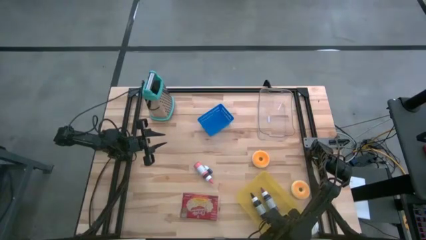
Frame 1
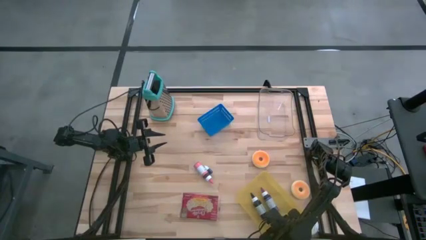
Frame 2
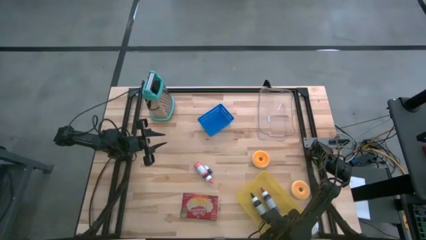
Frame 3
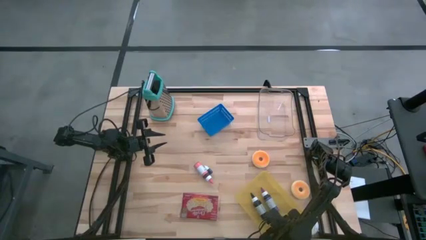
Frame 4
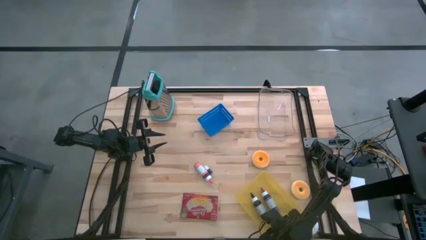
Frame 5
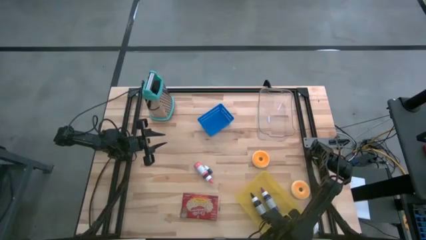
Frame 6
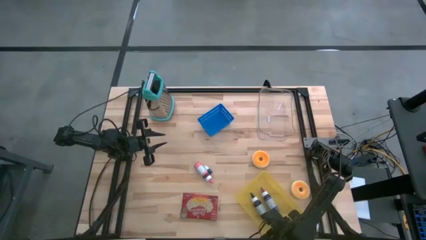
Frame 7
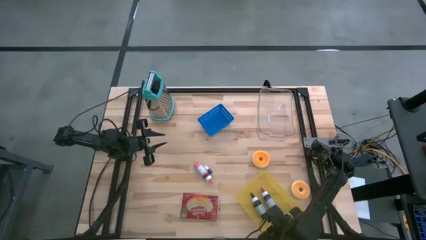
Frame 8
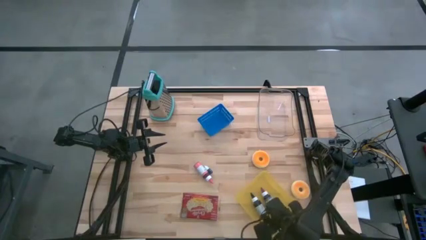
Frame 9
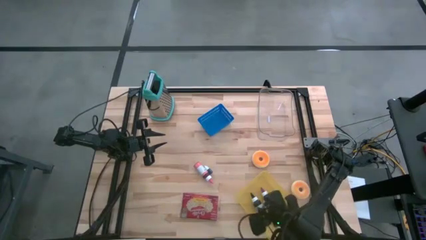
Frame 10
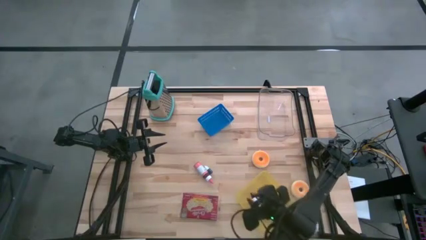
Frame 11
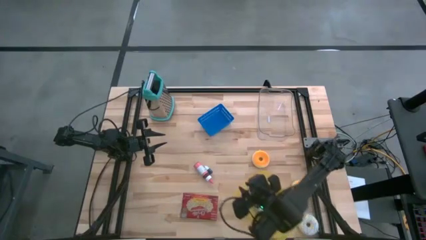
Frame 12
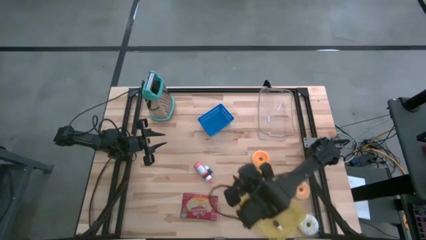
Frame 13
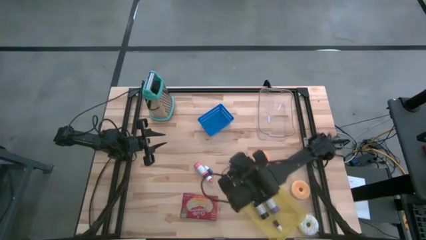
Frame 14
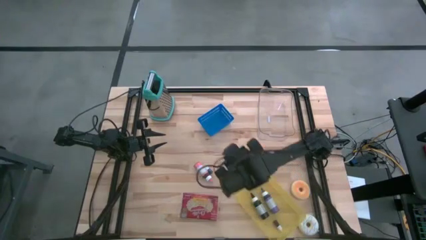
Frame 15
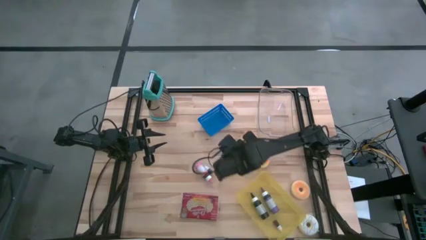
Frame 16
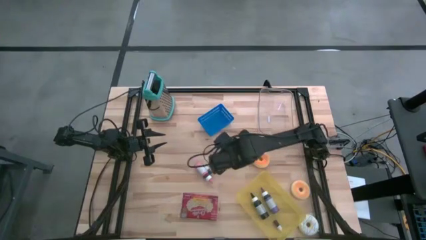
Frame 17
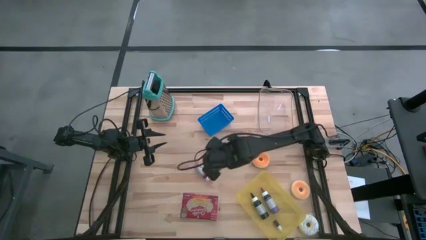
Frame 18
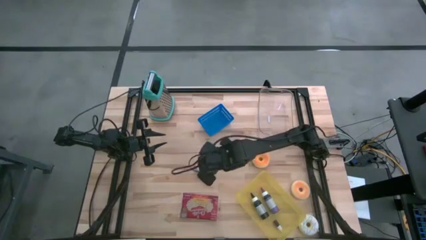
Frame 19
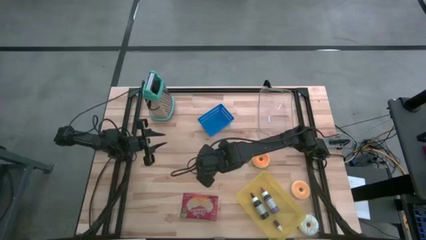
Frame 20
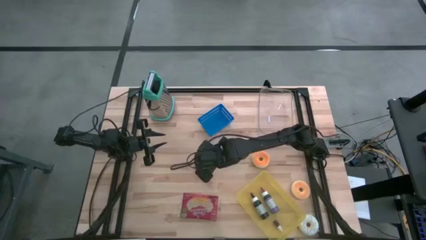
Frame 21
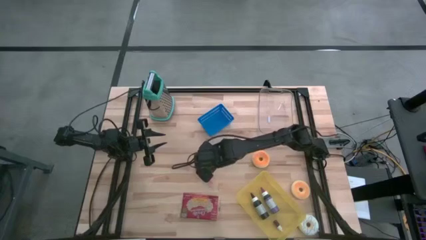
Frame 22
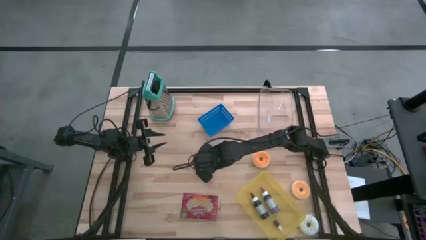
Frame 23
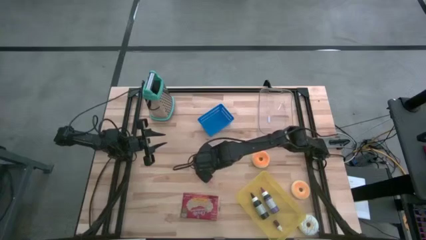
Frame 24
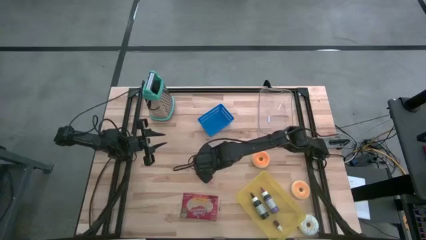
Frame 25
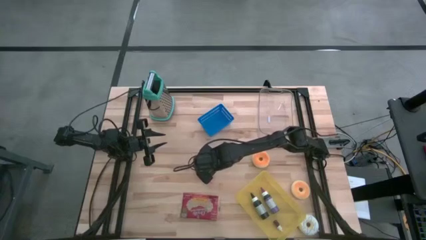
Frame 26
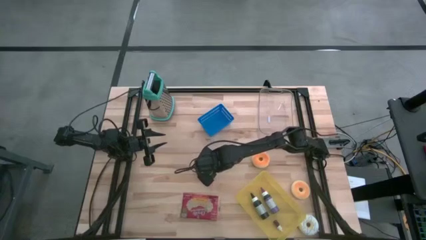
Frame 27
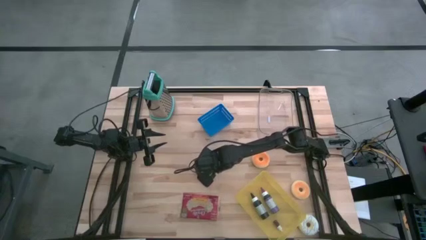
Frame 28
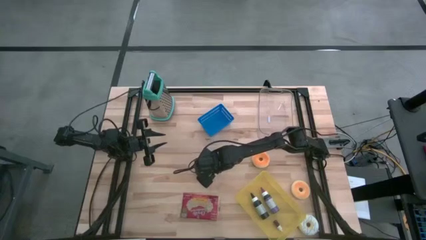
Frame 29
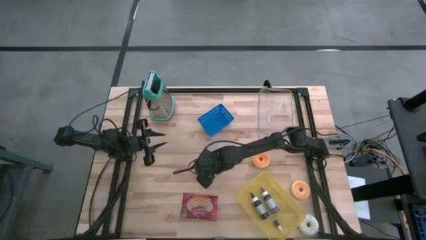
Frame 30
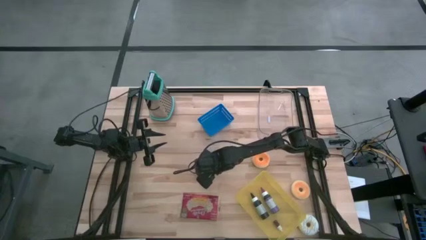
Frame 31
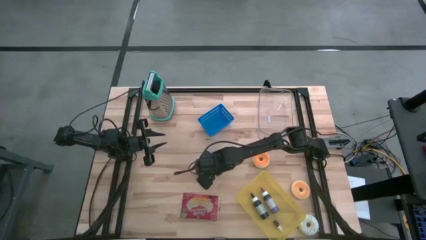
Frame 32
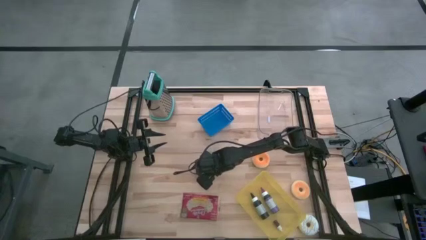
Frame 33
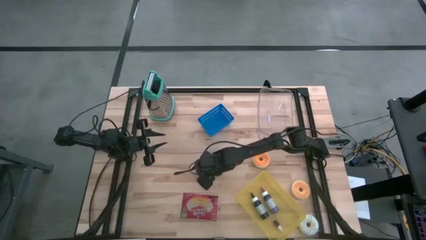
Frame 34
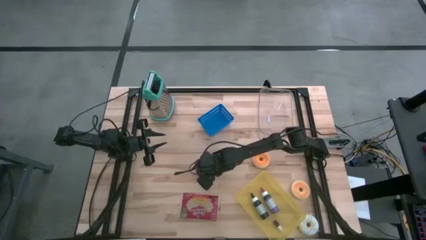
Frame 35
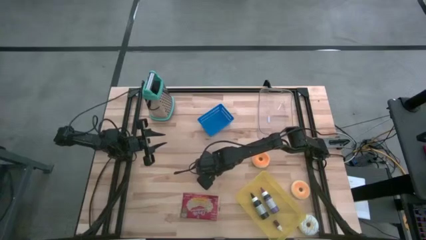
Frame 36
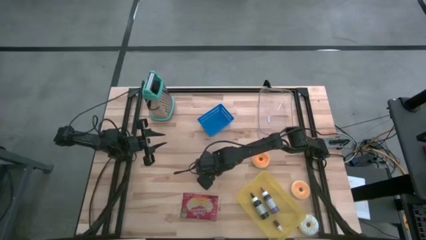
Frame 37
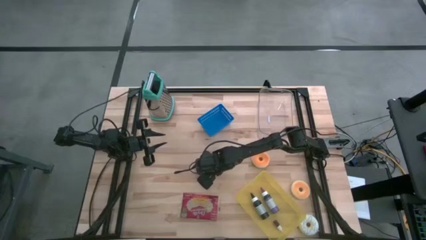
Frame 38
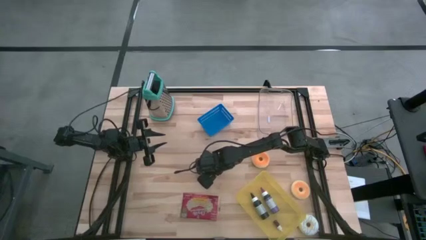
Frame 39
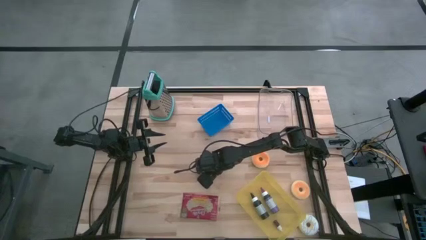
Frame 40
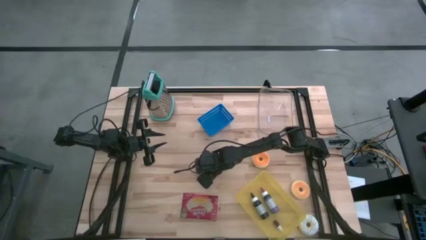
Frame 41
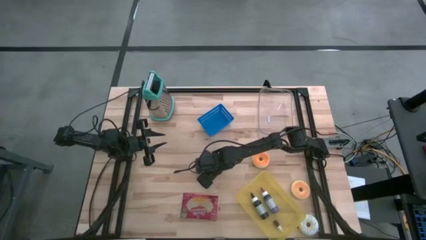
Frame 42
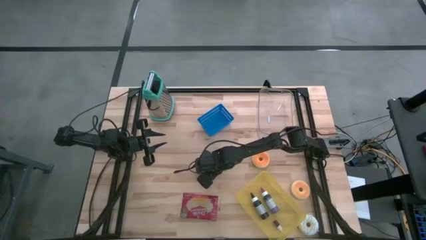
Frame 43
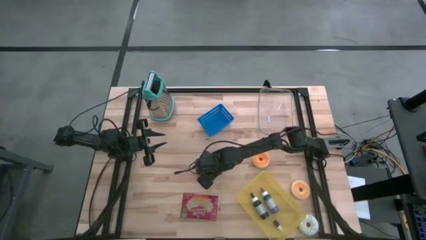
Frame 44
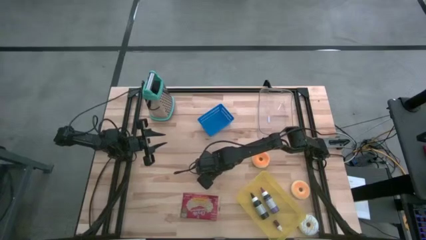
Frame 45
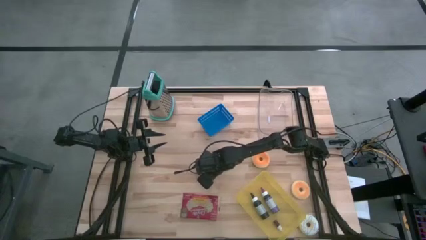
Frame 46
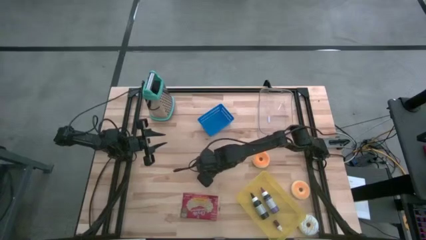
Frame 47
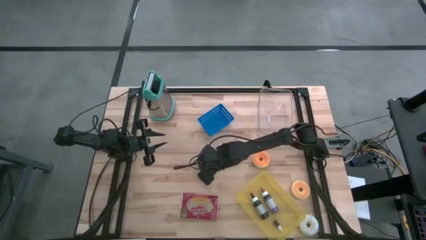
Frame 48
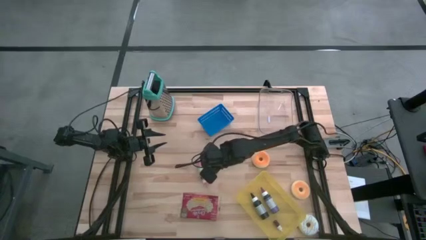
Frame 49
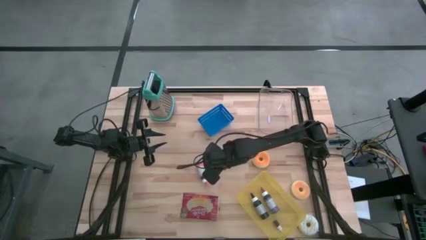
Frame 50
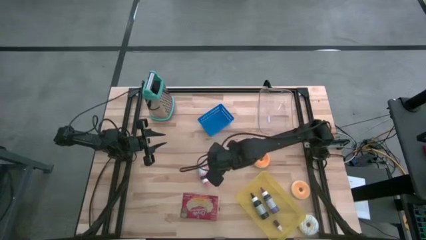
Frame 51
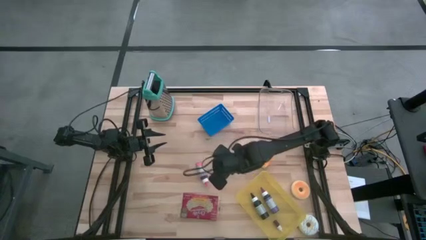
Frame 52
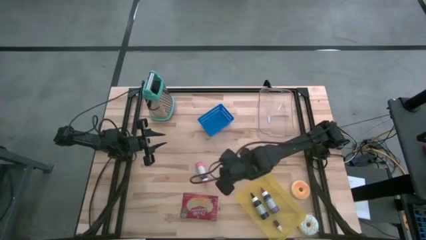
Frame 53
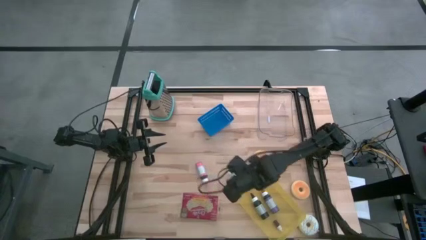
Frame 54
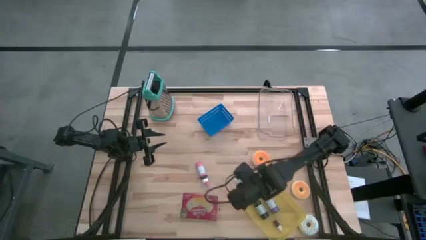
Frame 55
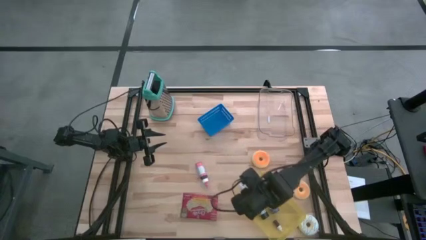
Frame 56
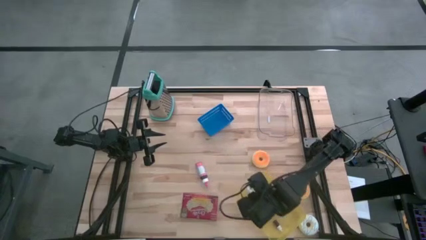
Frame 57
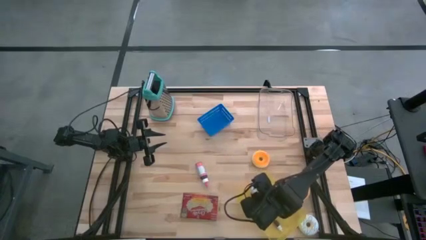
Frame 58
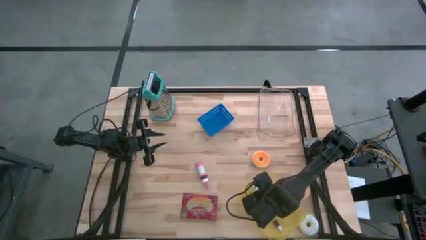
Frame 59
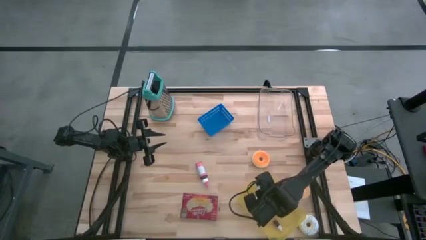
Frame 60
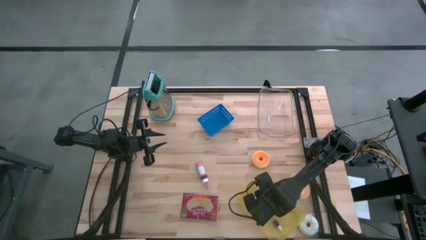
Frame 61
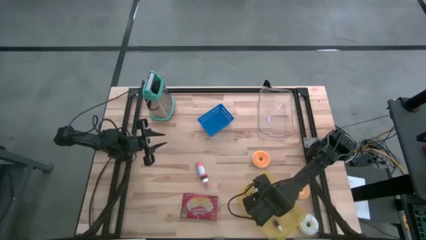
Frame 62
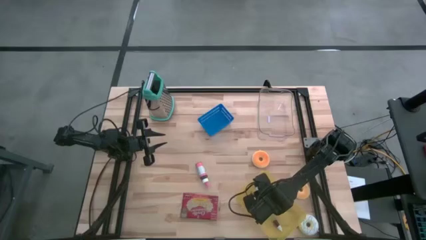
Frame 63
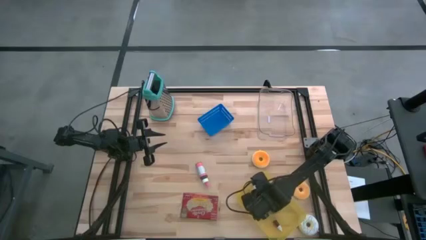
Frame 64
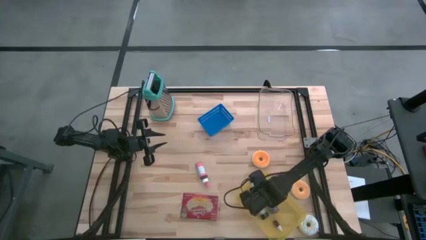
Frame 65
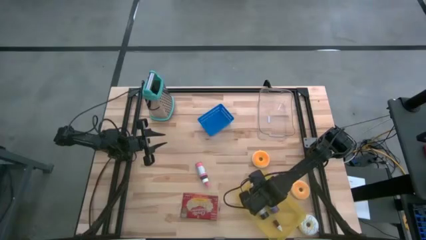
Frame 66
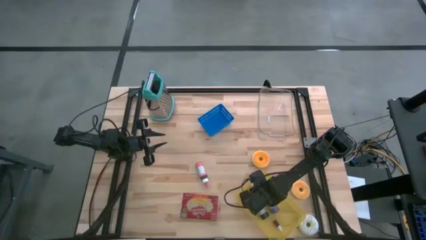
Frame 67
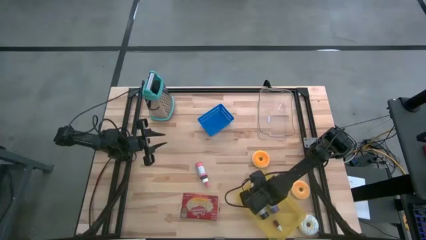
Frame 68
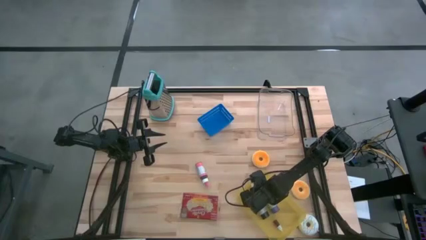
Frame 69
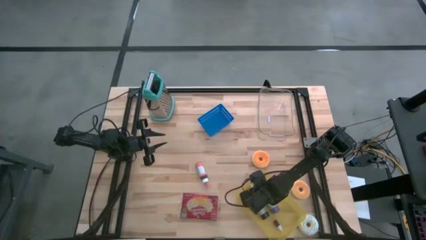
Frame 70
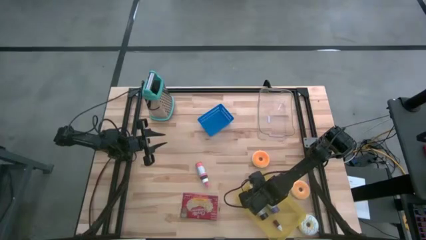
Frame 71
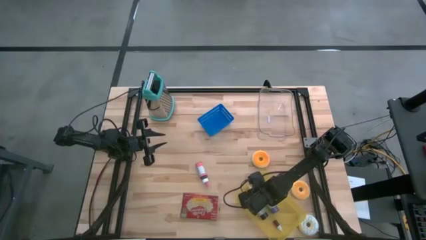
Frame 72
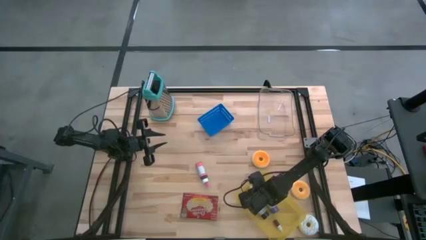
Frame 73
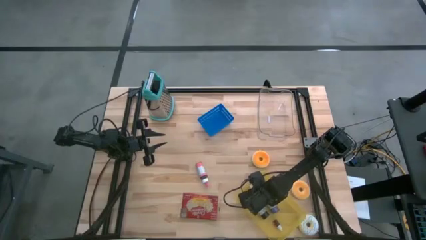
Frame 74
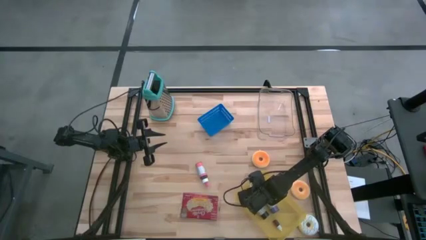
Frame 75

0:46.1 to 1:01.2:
Task: Pick & Place Food Item
Put the small blue food coloring into the yellow bin

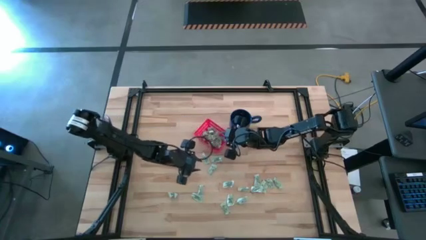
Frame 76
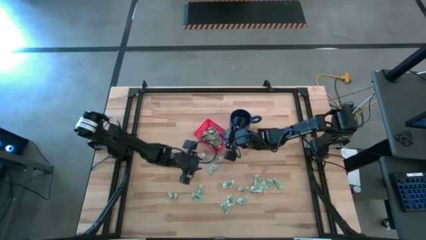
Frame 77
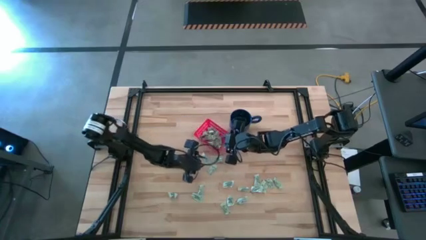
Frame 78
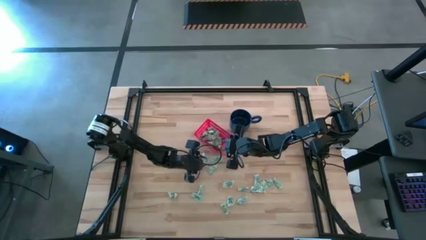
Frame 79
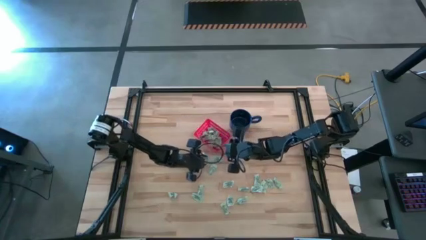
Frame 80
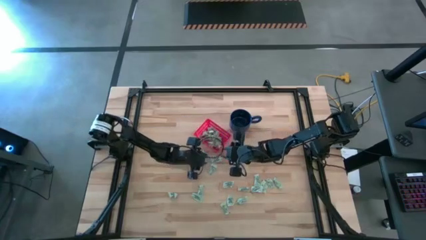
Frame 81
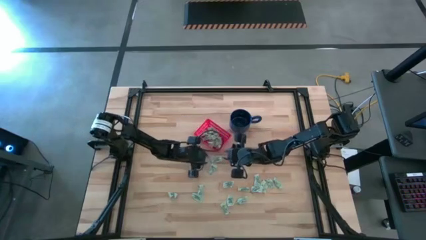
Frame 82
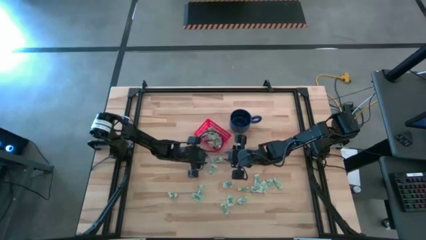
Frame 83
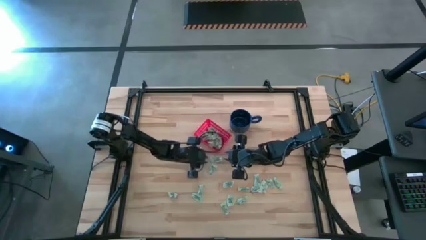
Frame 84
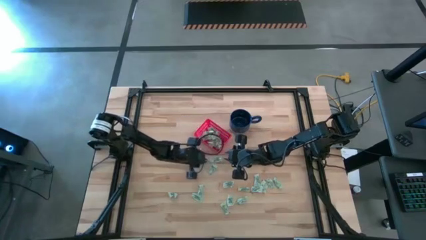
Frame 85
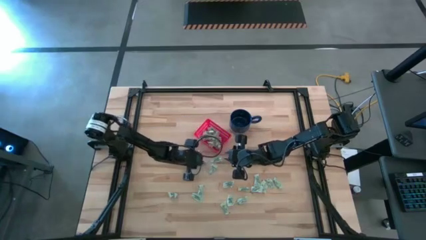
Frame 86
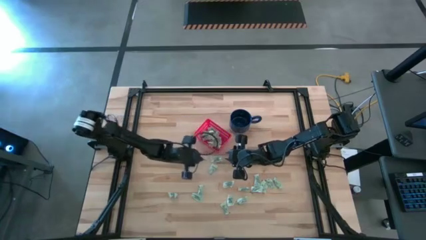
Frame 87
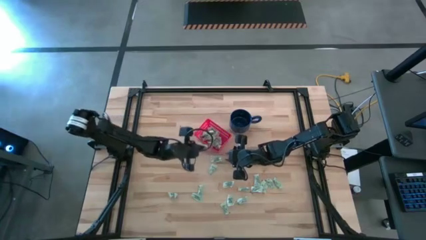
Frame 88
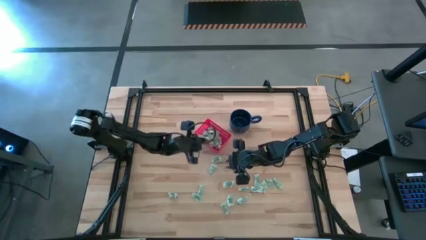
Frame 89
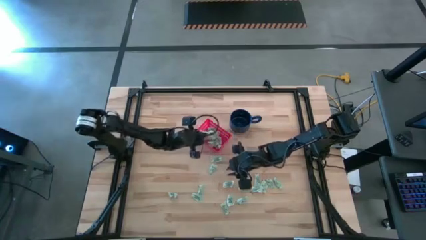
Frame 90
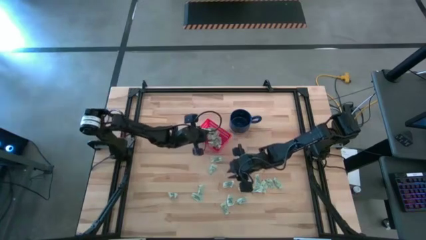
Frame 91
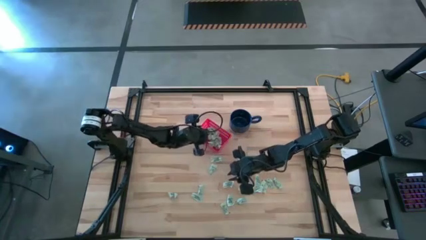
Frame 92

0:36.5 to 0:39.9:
Task: Pick and place items into bin
Put the stevia packet into the bin
